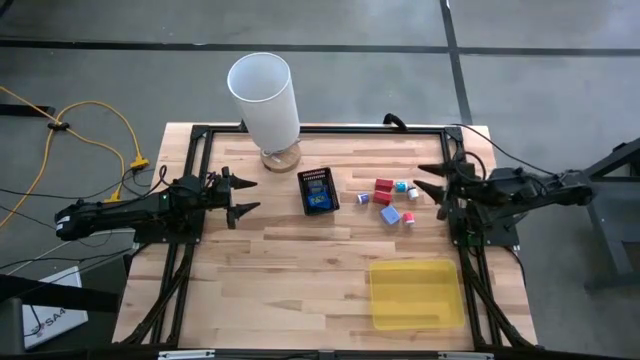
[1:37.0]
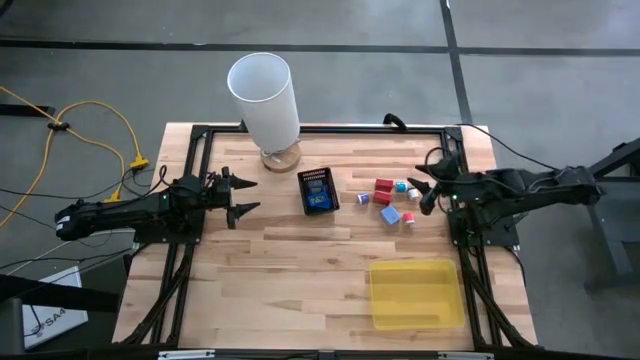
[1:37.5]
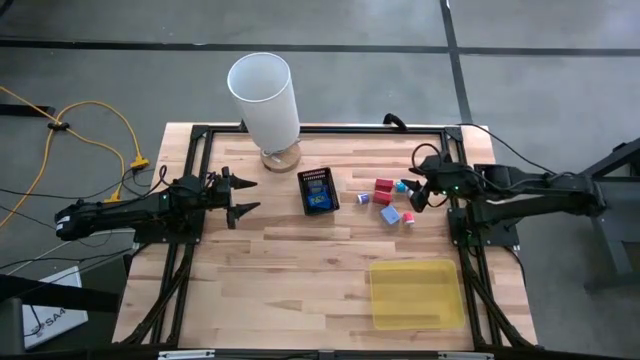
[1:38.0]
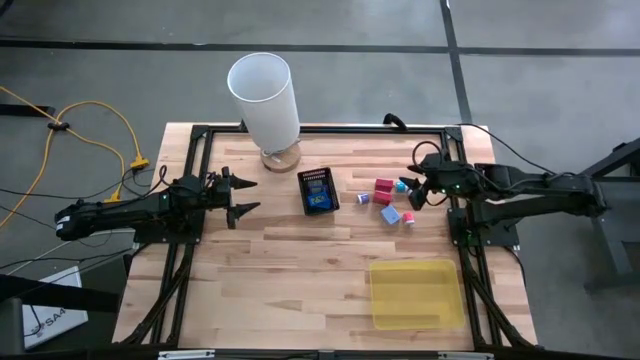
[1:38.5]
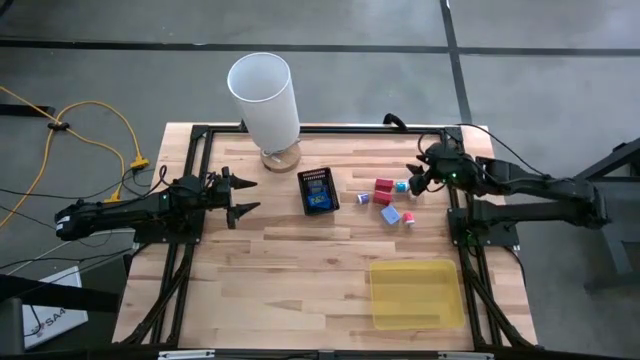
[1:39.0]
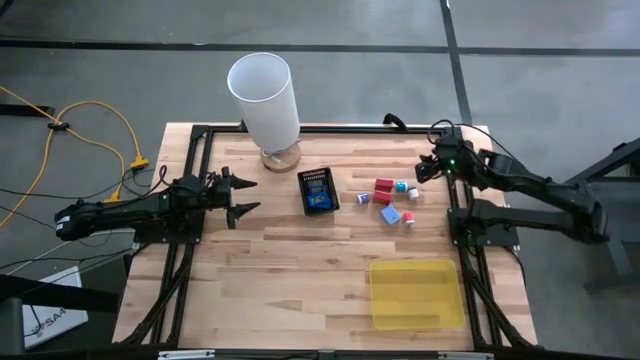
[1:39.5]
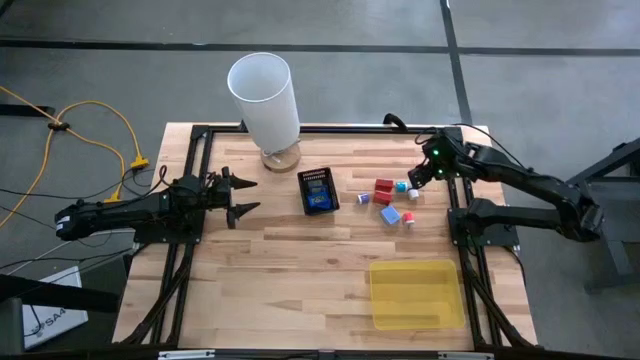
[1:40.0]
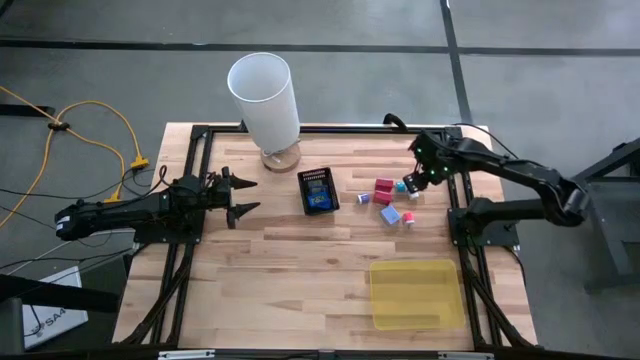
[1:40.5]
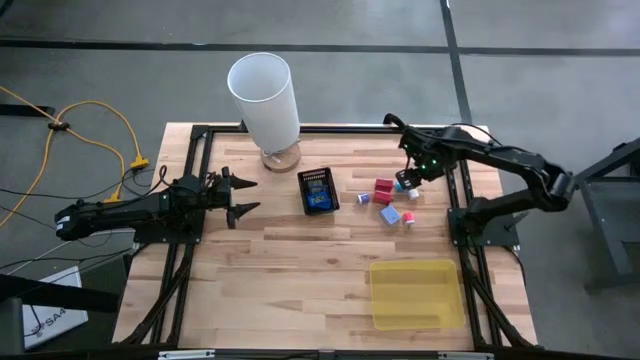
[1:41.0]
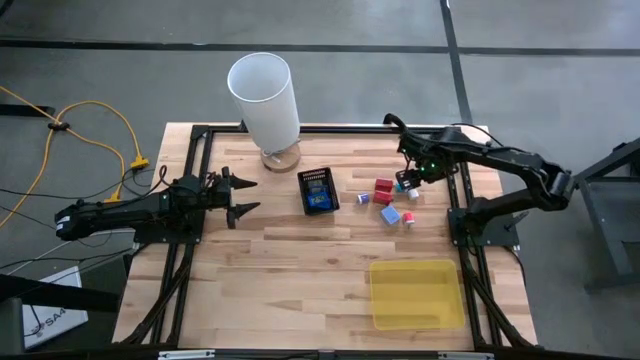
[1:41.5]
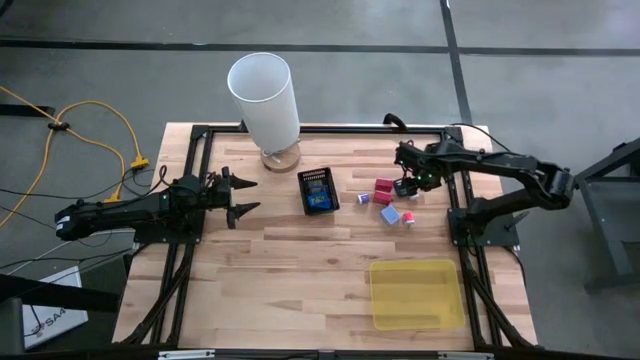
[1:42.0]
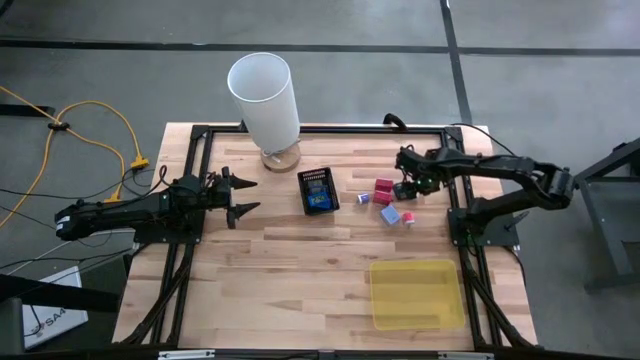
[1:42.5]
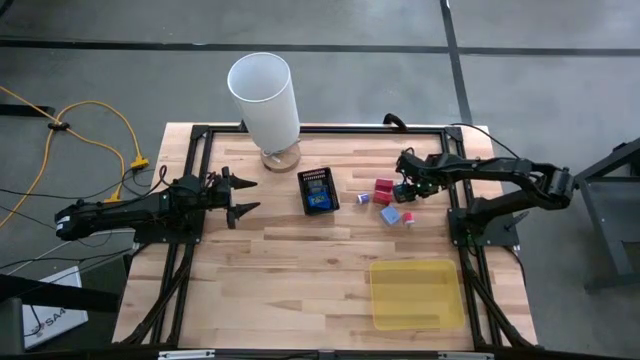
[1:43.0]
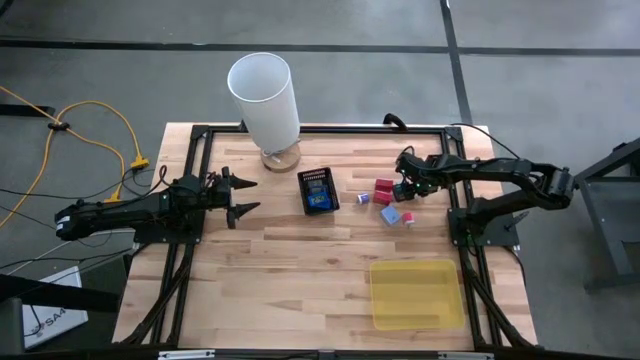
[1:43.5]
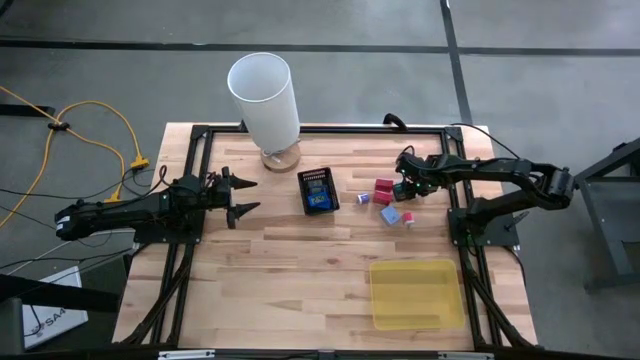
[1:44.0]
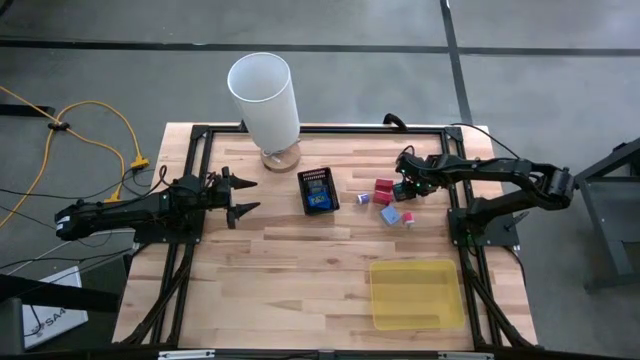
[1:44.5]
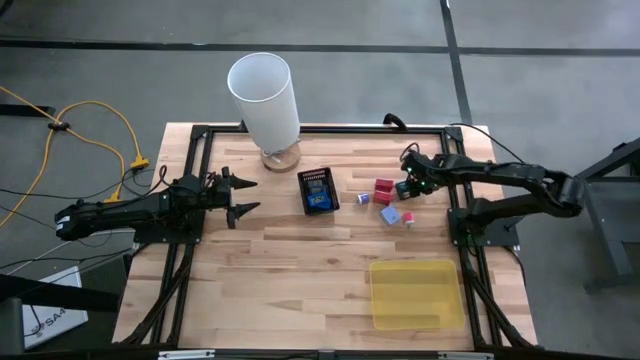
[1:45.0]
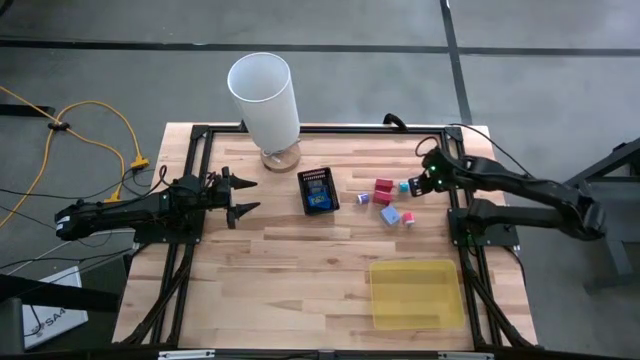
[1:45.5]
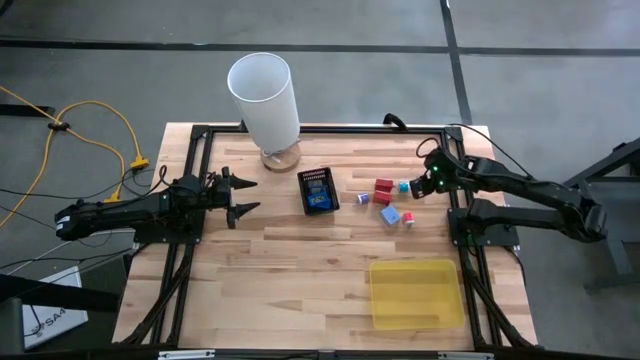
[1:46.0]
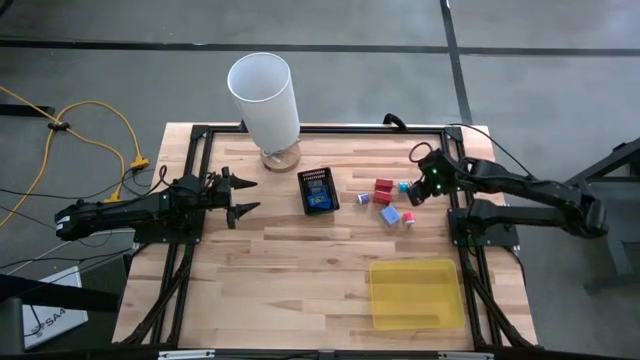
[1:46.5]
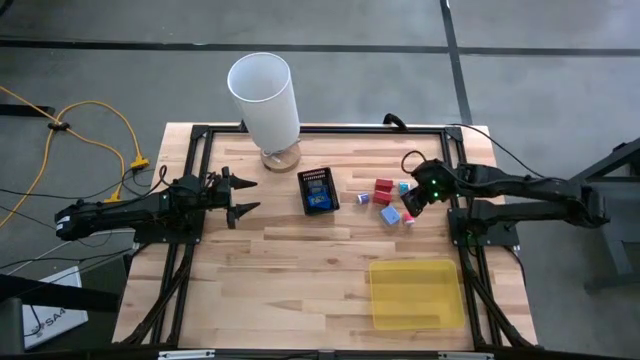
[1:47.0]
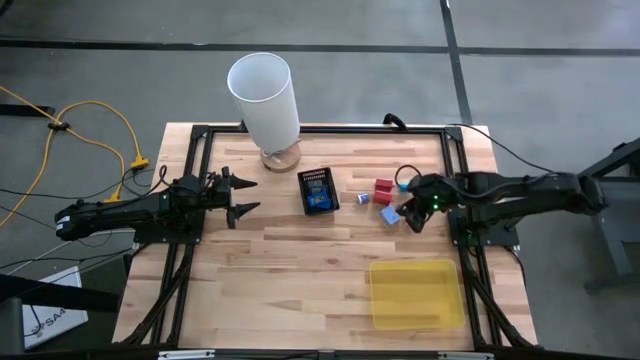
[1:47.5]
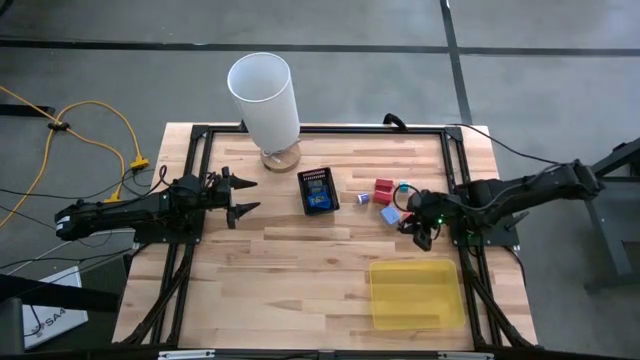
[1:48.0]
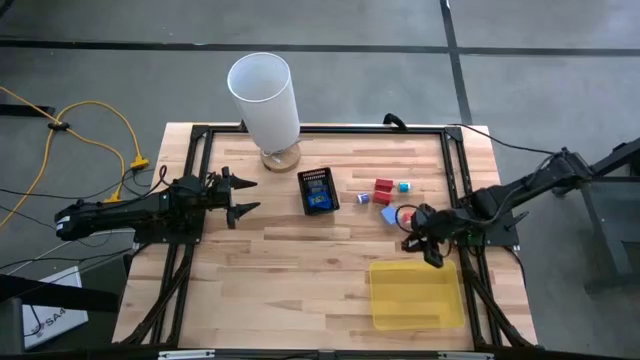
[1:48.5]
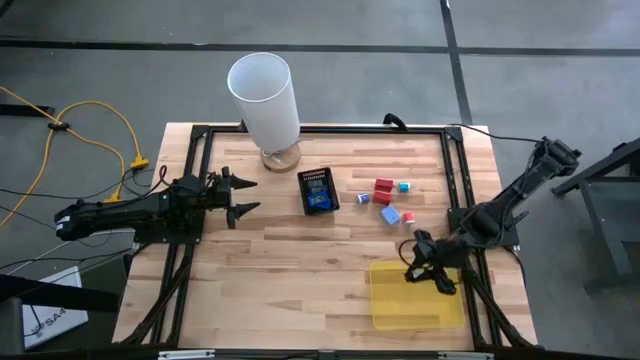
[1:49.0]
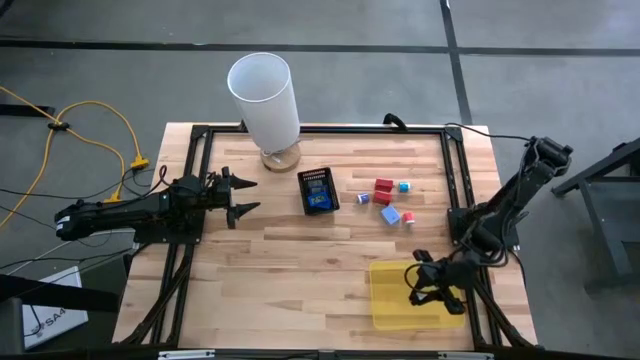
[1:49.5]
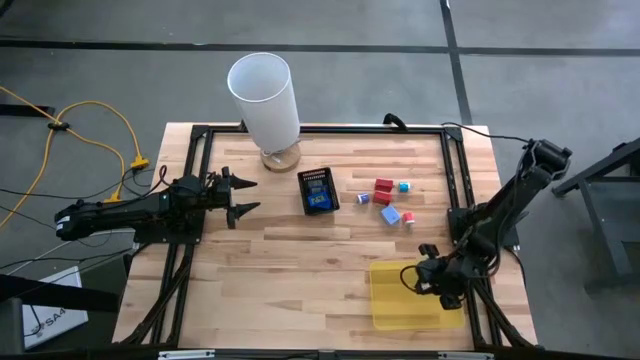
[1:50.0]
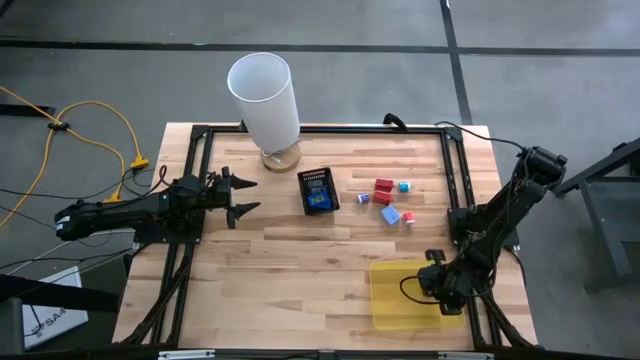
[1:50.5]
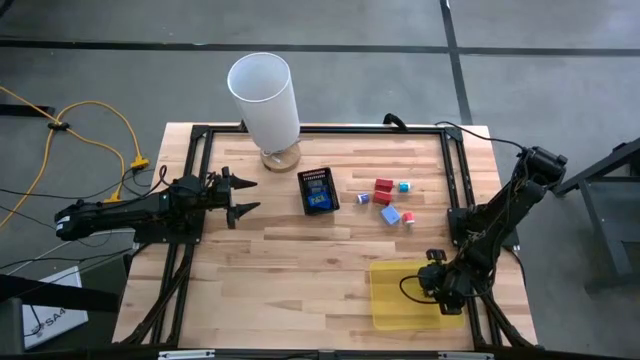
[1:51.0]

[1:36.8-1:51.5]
Task: Pick & Place Office items
Put the white charger adaptor into the yellow bin

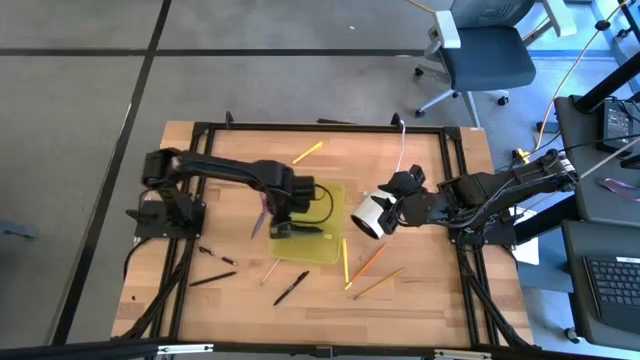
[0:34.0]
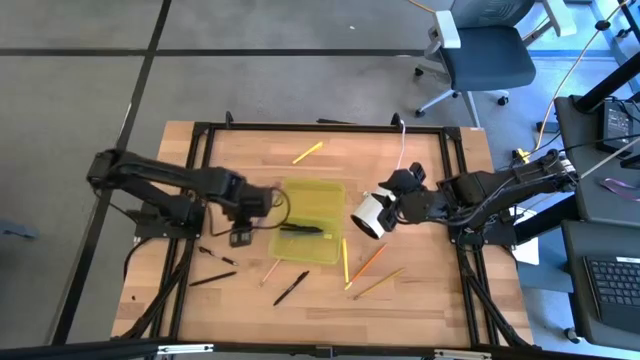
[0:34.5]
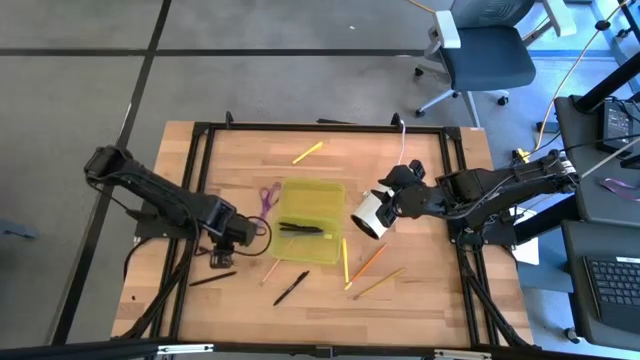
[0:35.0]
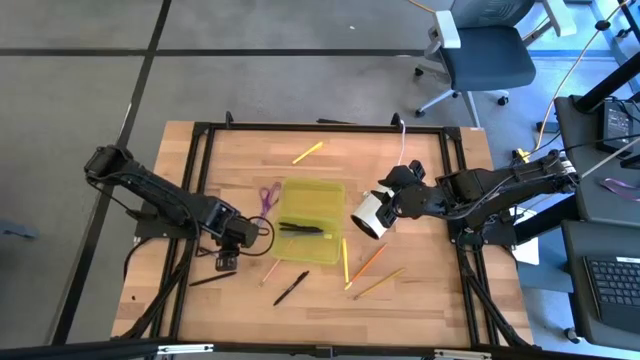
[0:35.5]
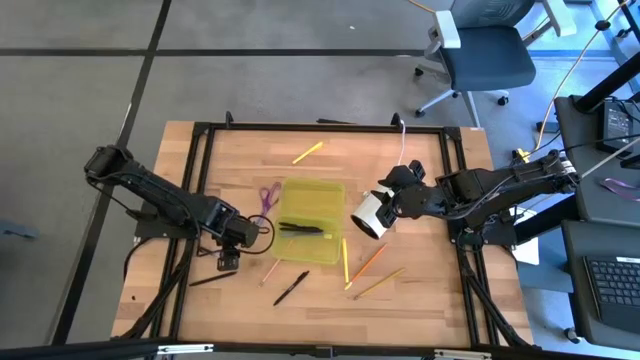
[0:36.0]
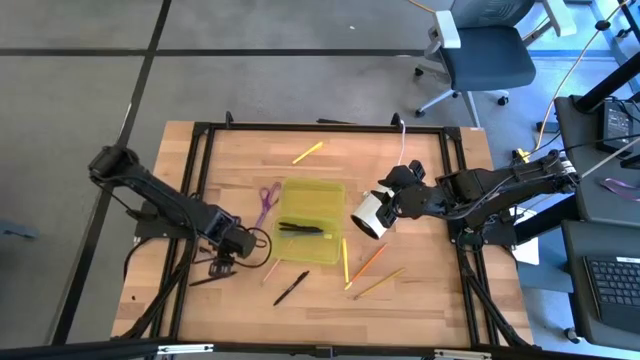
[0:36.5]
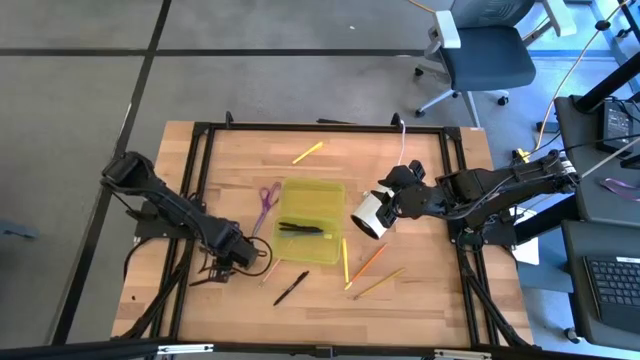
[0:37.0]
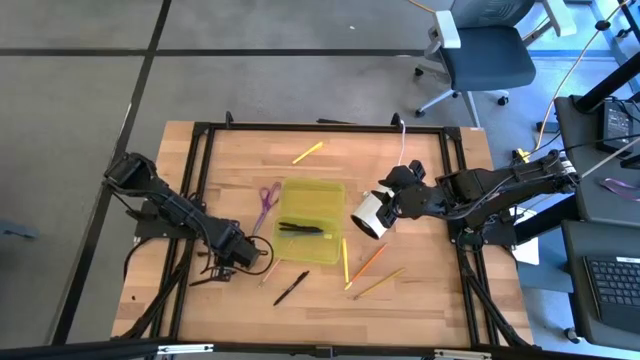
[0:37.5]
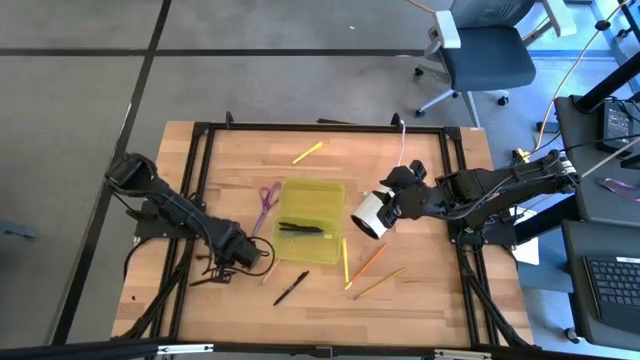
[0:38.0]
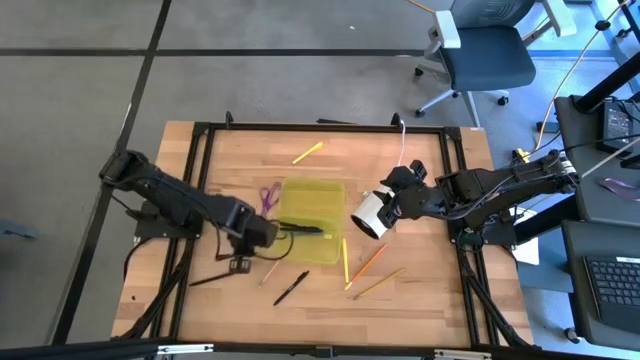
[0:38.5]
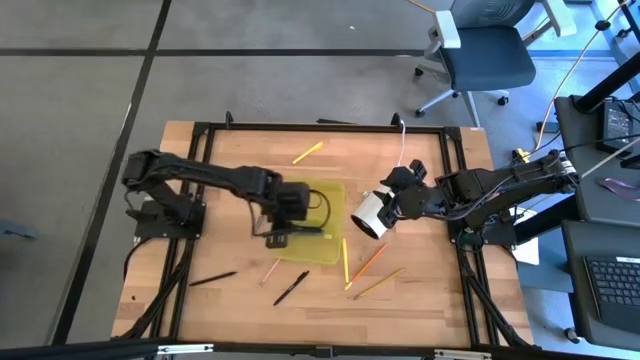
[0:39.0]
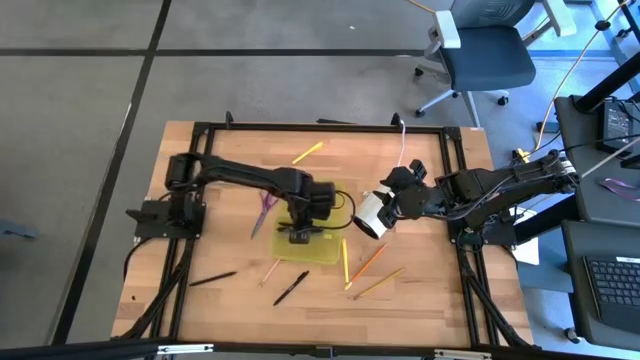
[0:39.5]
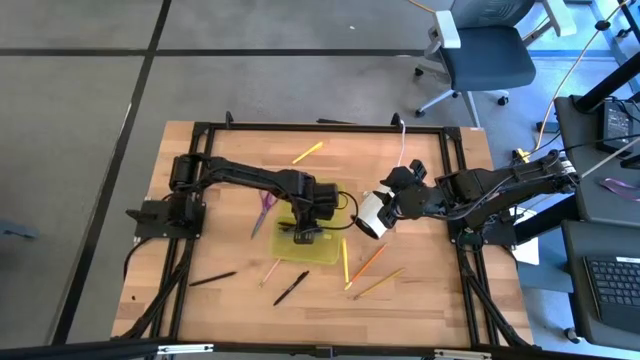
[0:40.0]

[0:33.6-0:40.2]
Task: Pick & place school supplies into a supply box
Put the black pen into the yellow supply box
